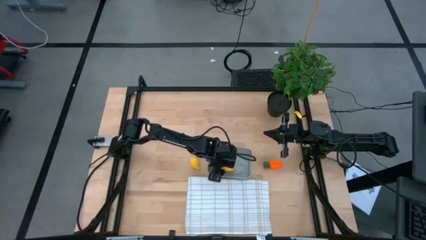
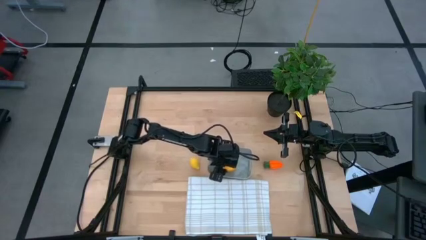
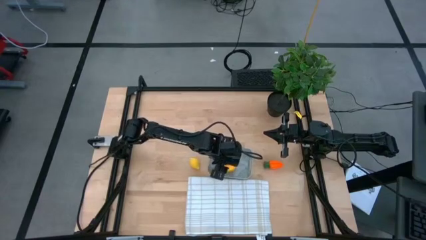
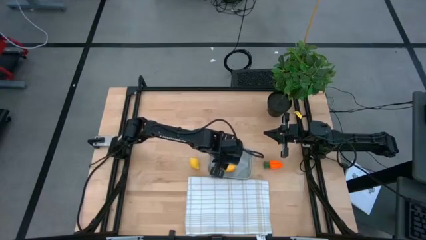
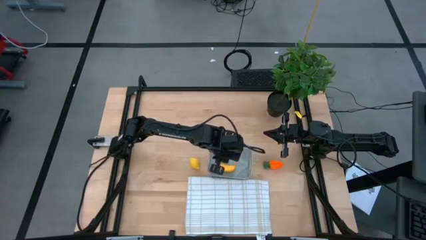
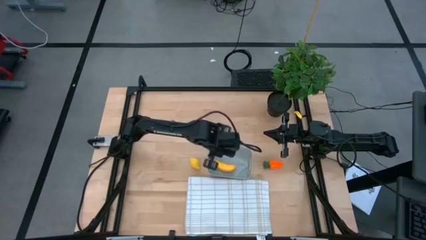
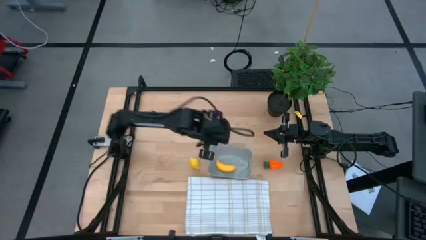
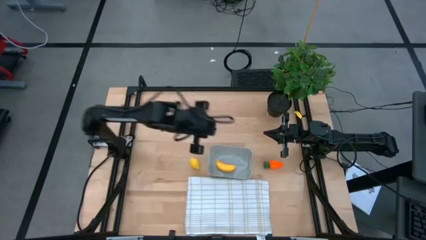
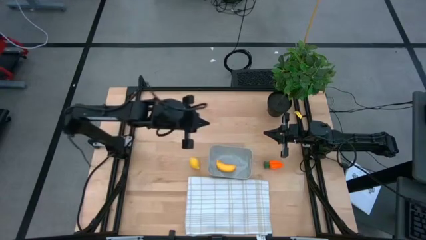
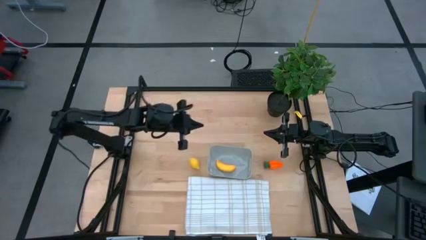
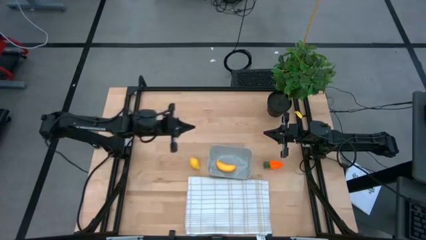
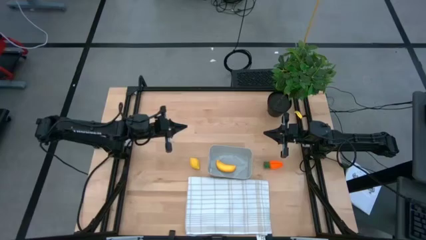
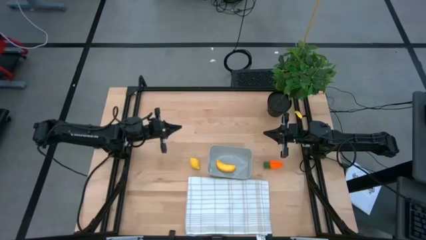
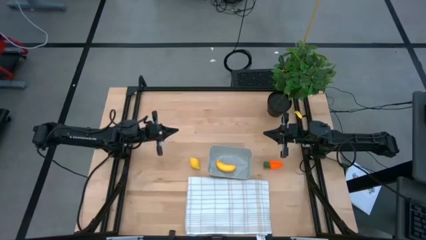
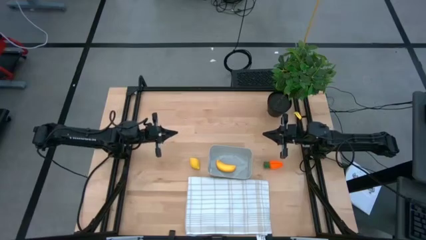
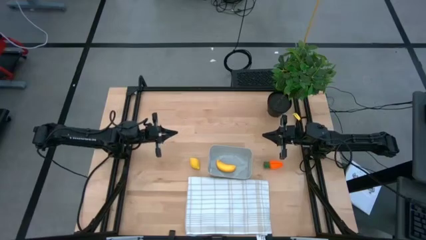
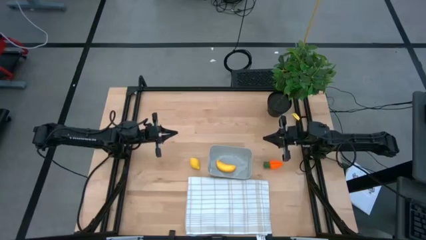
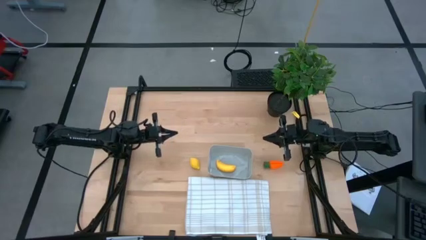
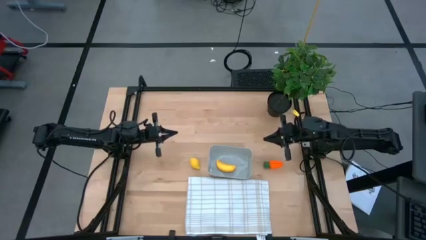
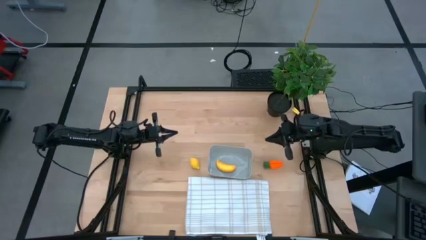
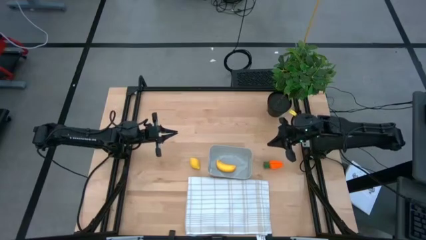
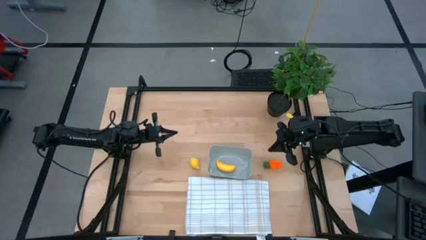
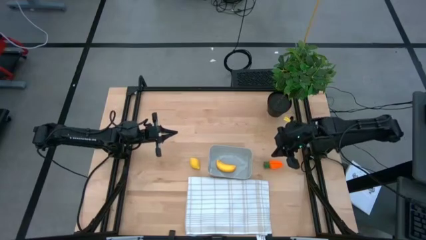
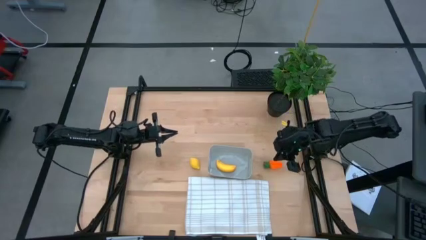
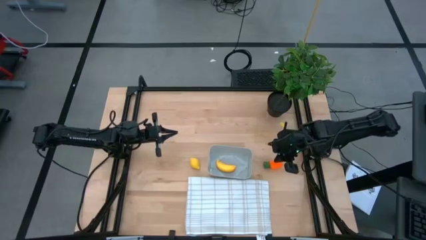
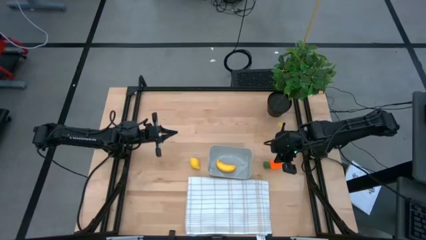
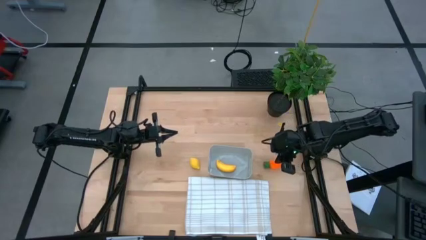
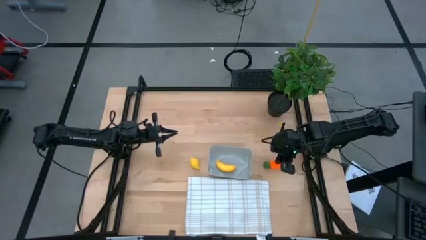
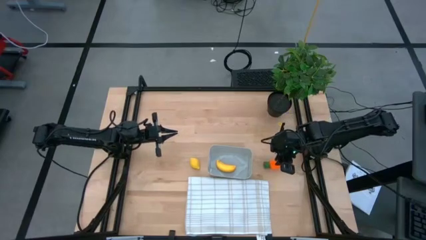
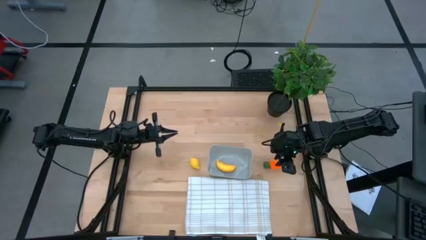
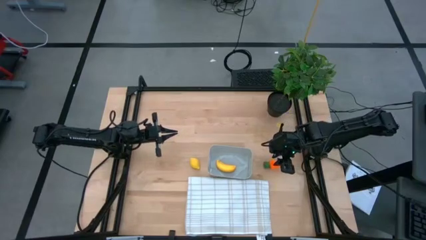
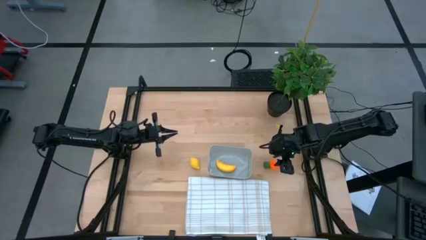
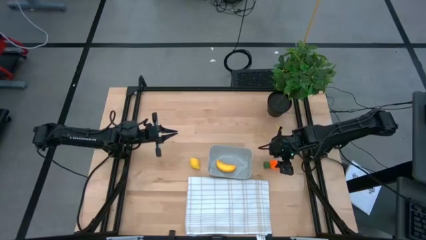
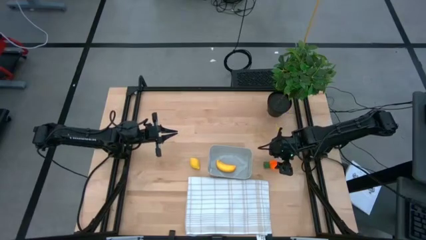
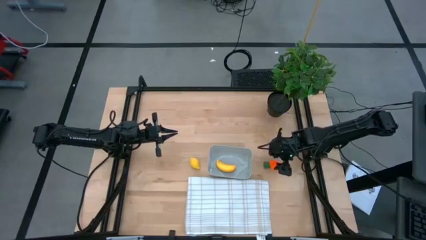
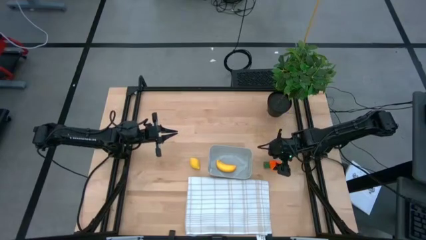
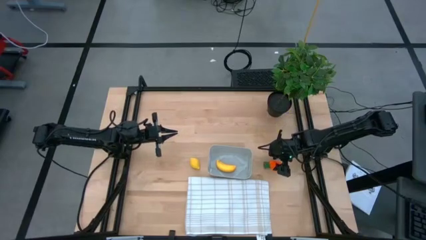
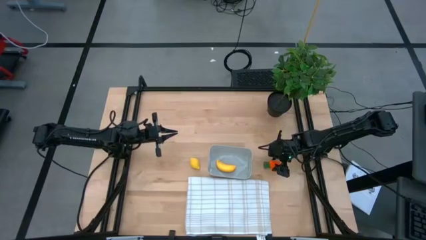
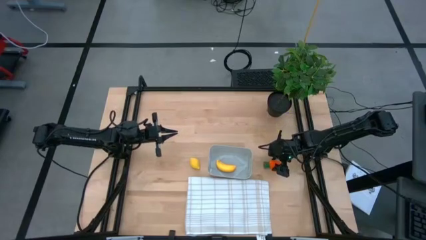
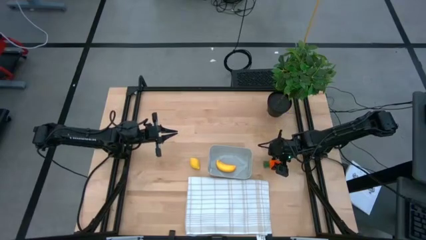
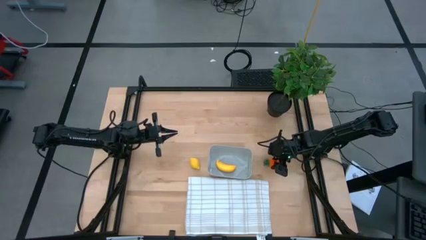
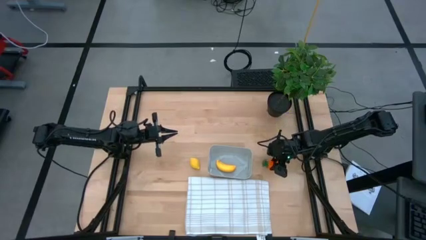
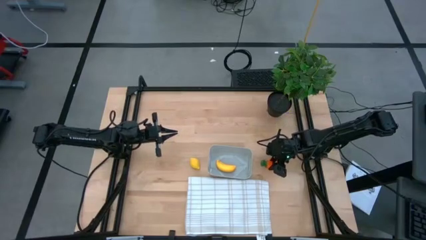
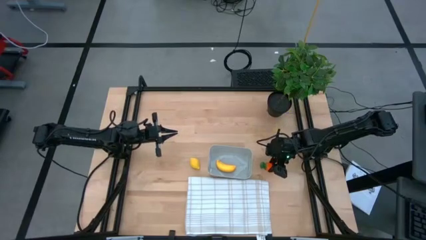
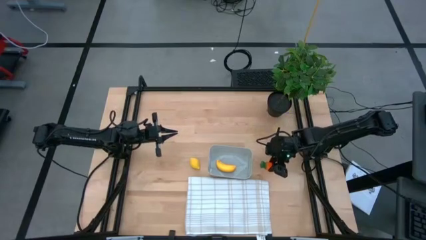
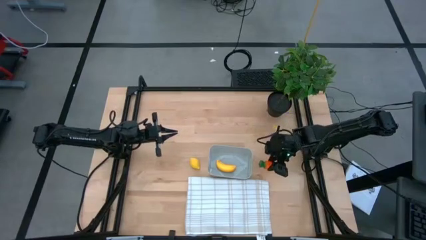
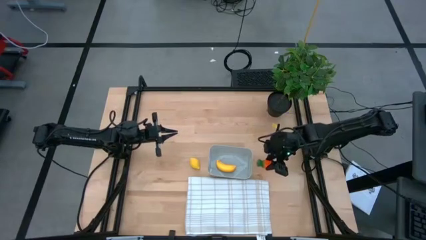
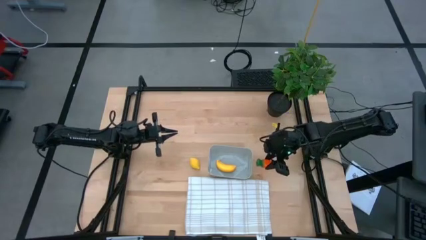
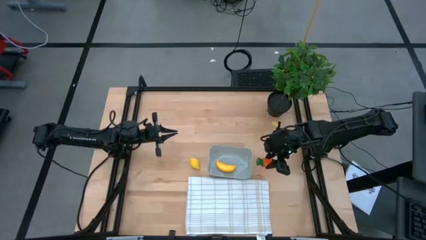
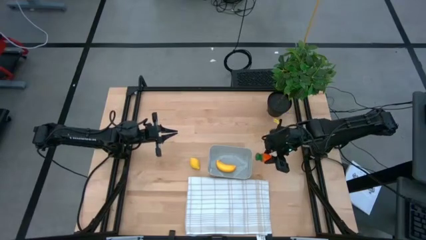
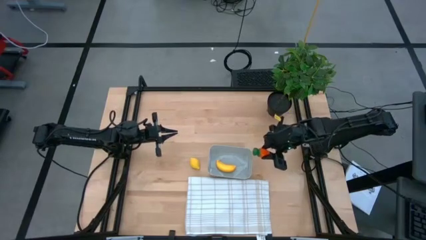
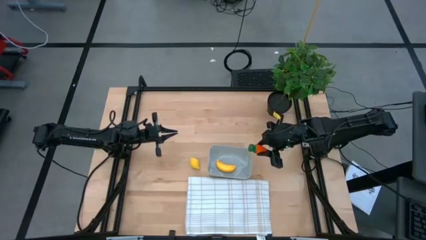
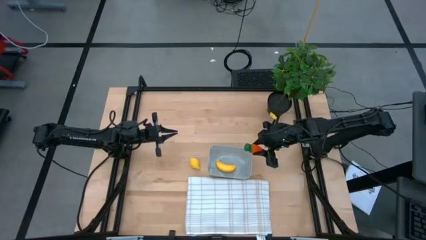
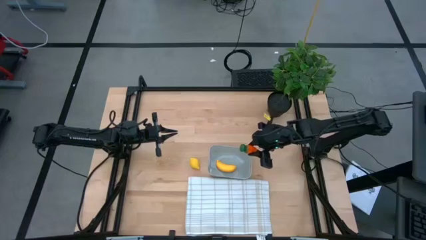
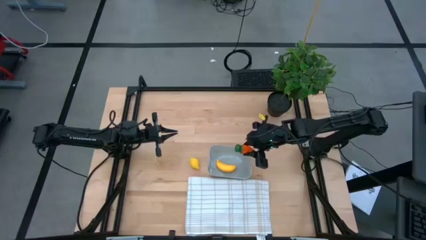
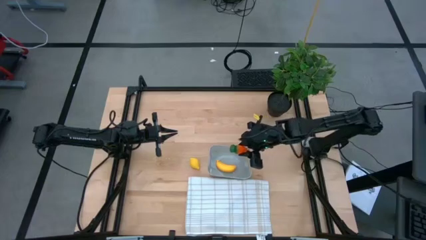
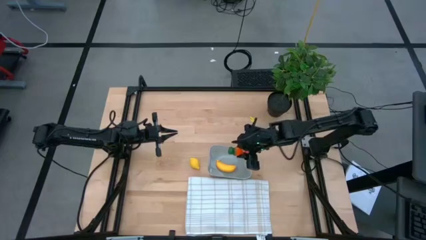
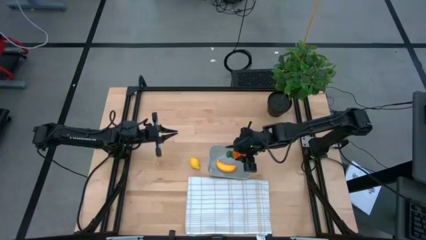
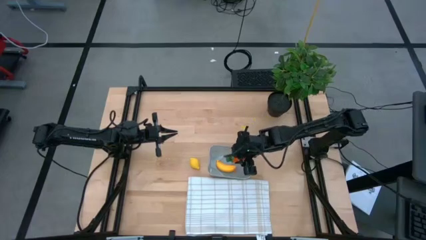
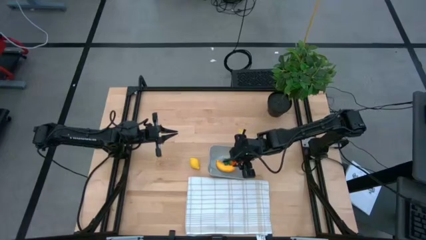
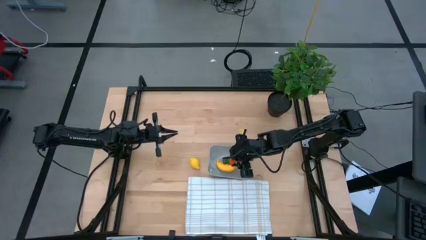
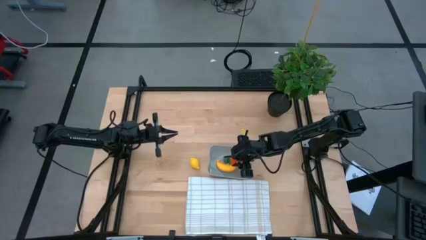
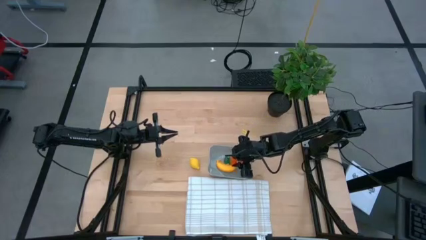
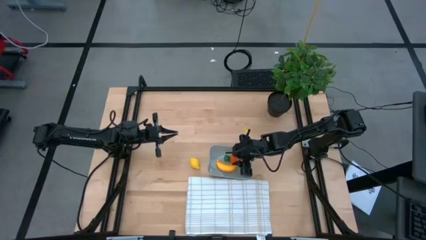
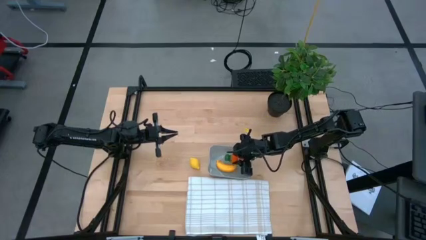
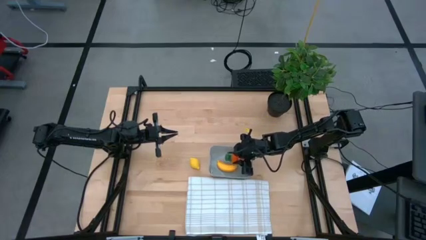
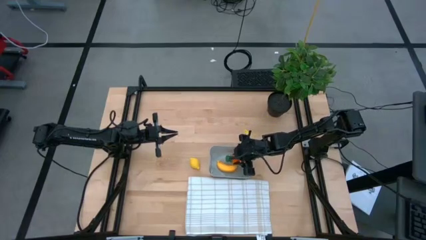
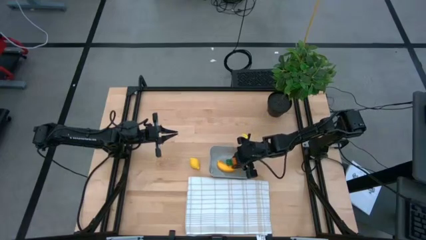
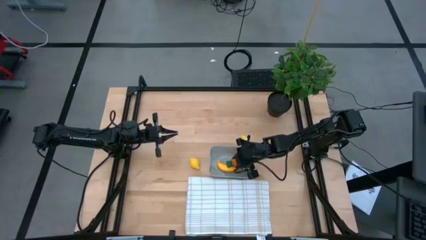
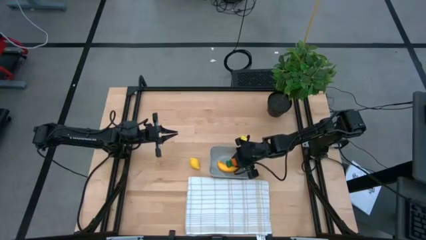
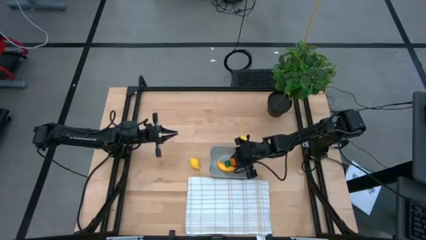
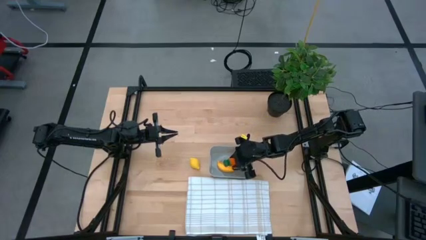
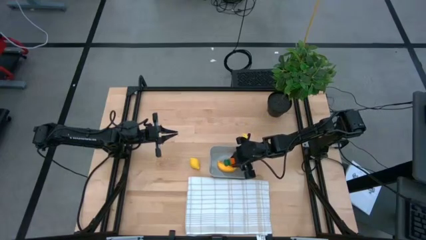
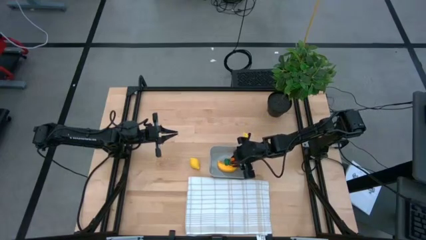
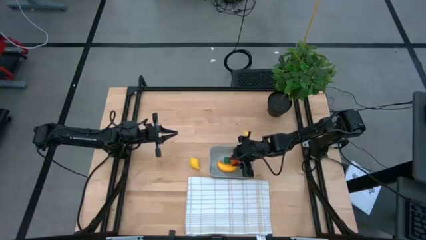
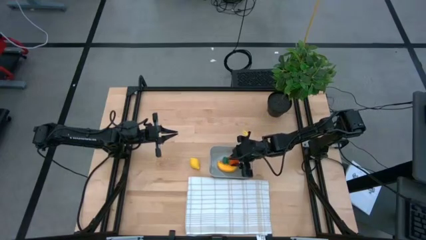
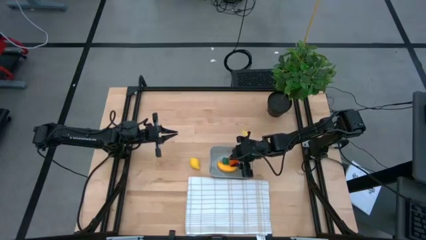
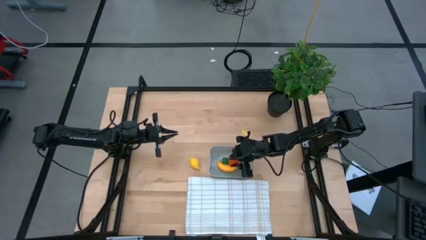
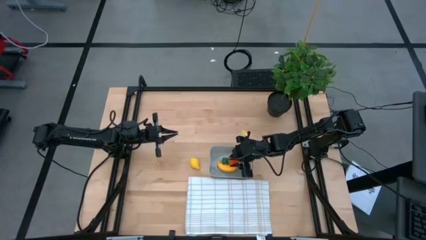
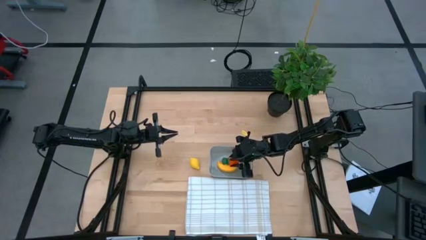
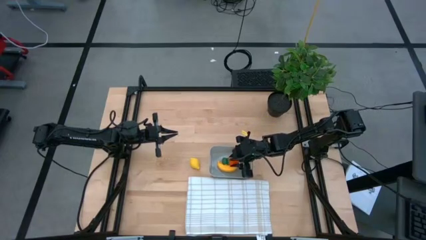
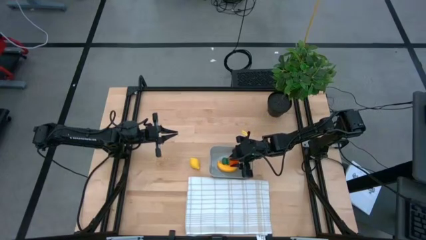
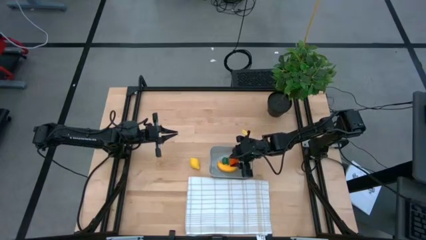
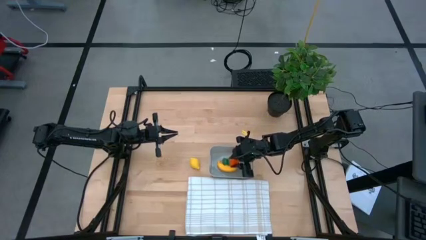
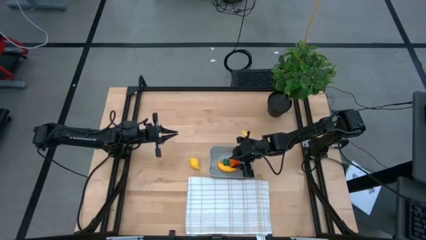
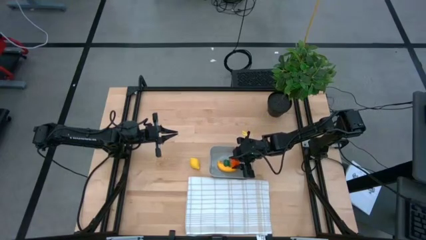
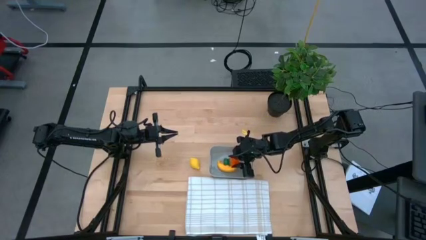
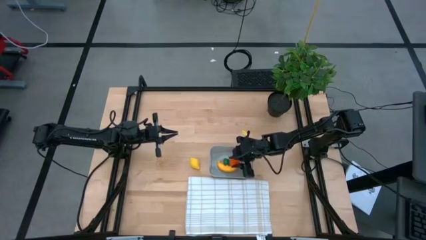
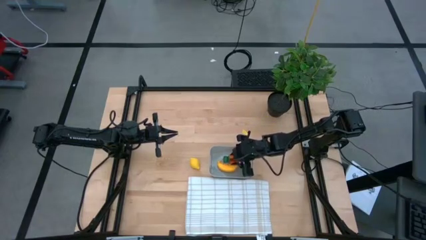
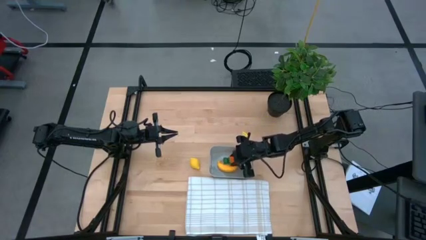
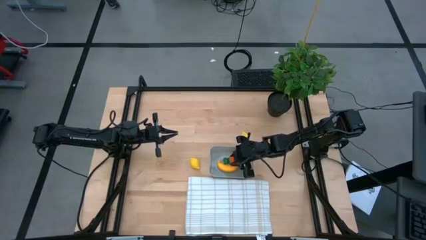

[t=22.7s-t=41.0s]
Task: Pick and placing Produce into tupperware
Put the orange carrot into the gray bin
